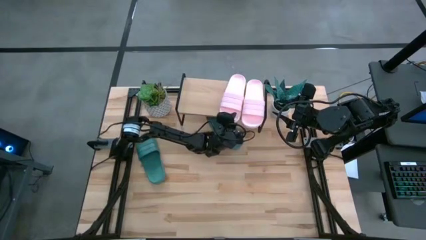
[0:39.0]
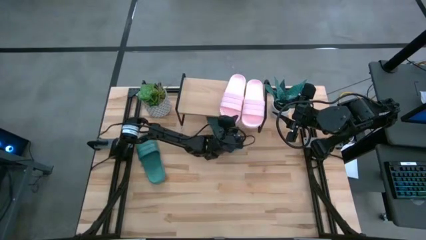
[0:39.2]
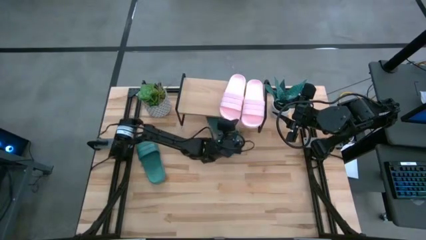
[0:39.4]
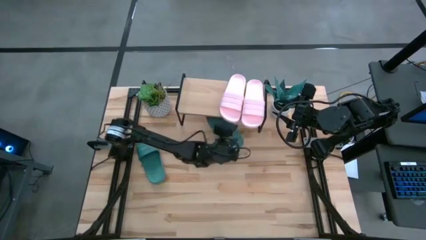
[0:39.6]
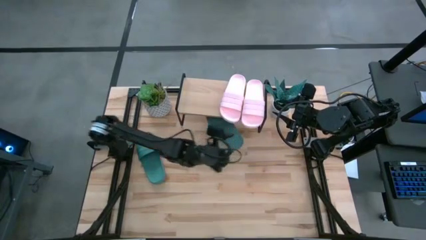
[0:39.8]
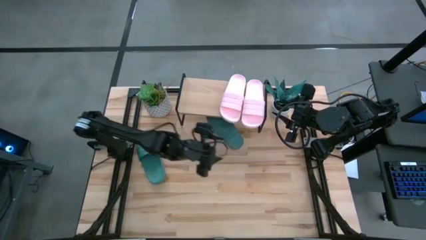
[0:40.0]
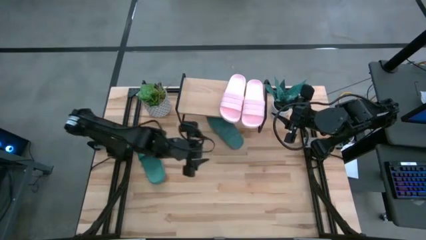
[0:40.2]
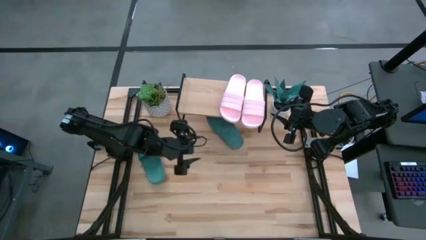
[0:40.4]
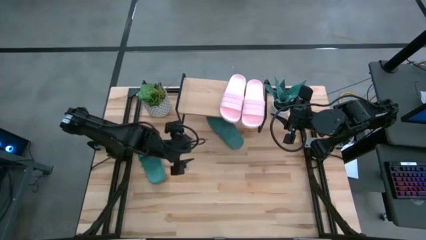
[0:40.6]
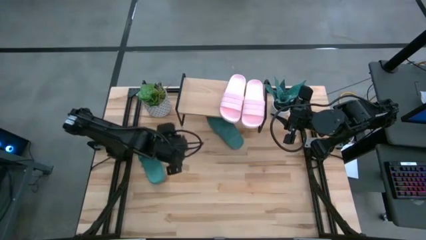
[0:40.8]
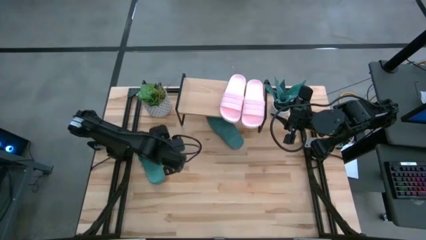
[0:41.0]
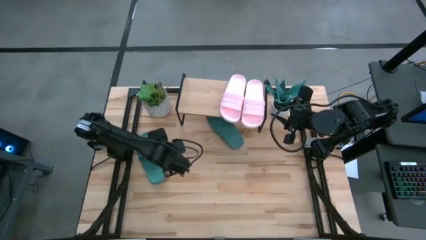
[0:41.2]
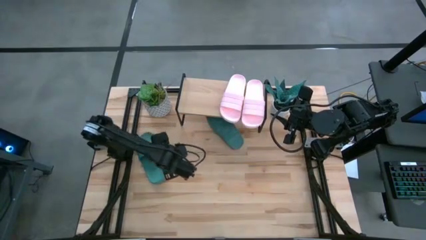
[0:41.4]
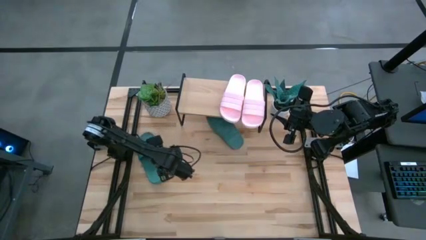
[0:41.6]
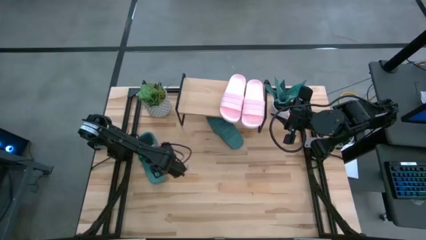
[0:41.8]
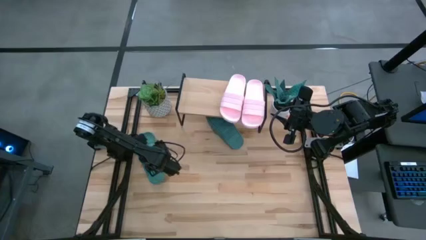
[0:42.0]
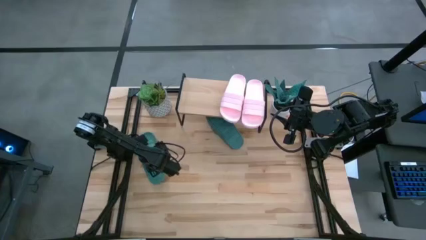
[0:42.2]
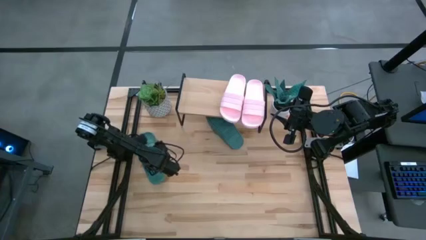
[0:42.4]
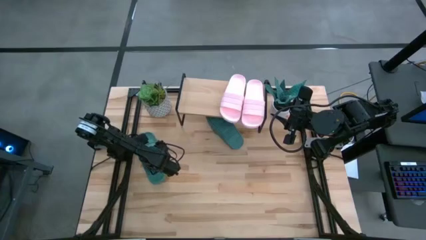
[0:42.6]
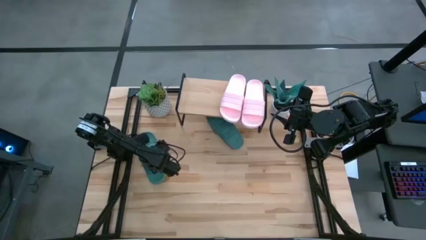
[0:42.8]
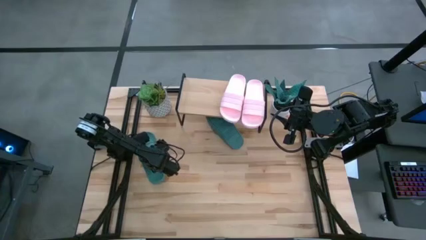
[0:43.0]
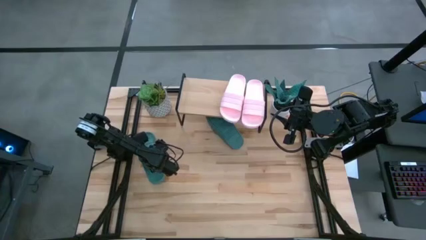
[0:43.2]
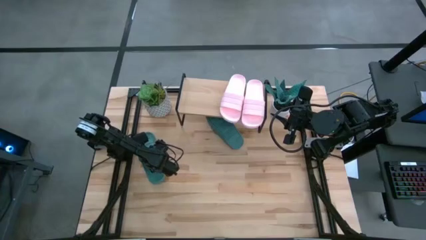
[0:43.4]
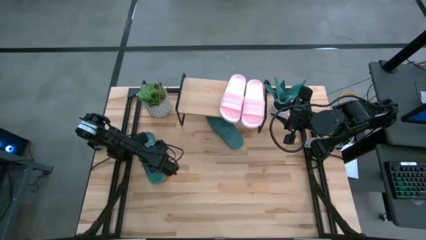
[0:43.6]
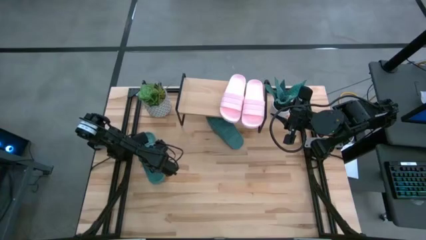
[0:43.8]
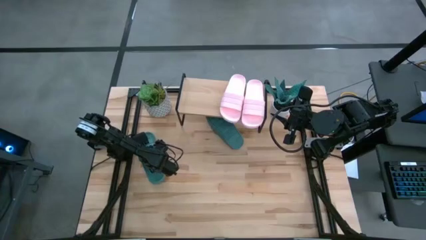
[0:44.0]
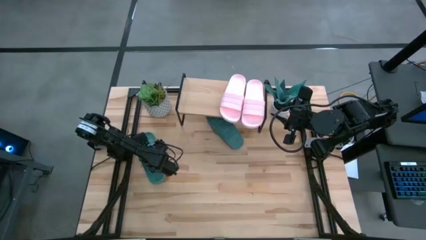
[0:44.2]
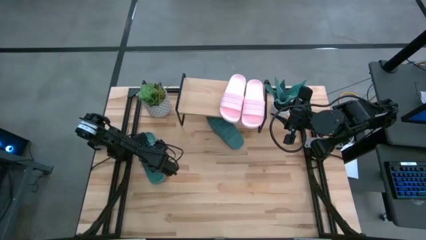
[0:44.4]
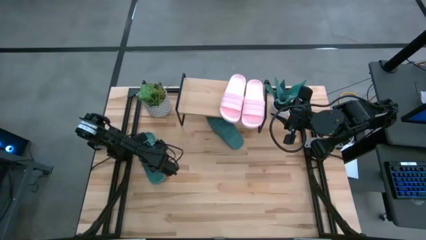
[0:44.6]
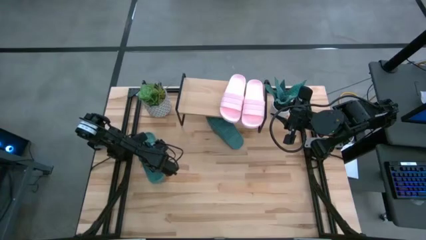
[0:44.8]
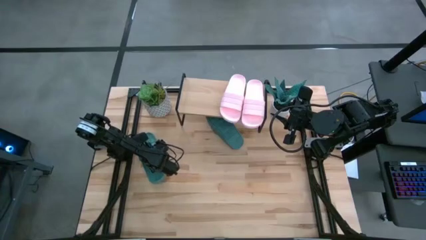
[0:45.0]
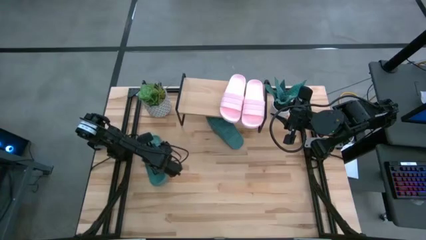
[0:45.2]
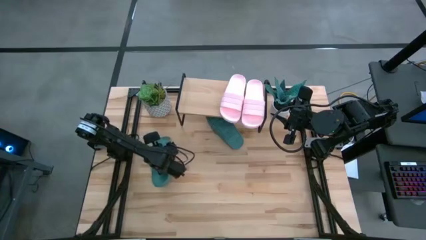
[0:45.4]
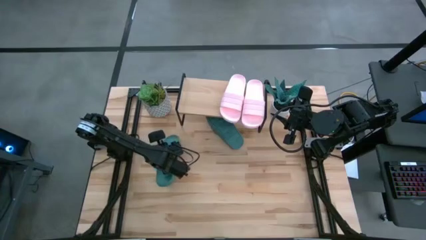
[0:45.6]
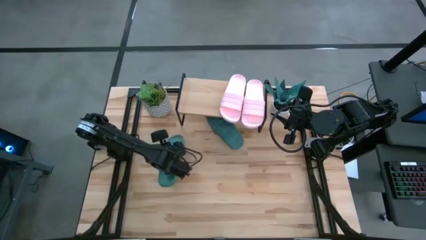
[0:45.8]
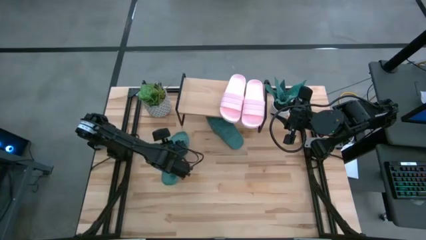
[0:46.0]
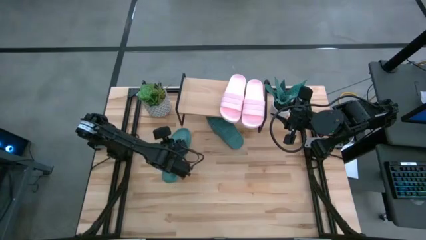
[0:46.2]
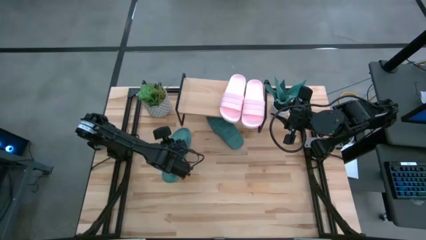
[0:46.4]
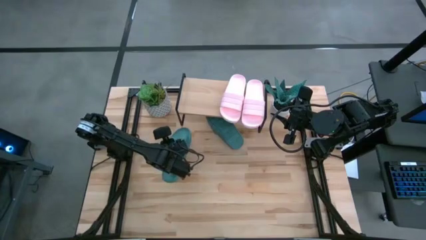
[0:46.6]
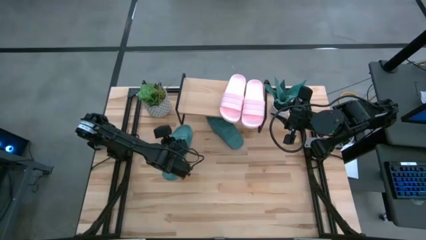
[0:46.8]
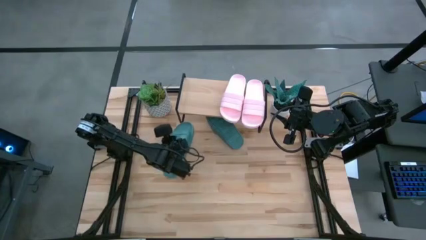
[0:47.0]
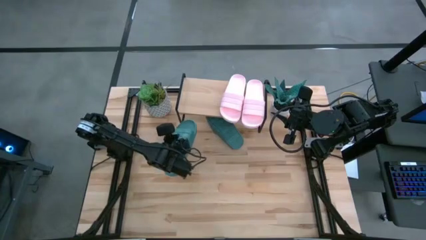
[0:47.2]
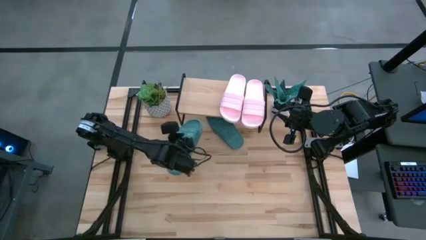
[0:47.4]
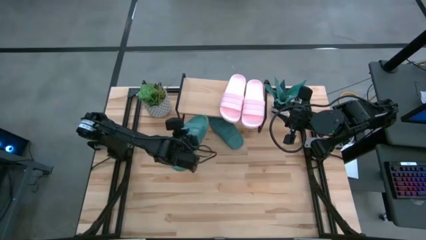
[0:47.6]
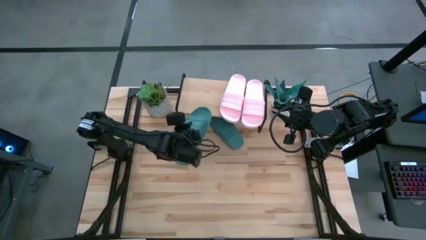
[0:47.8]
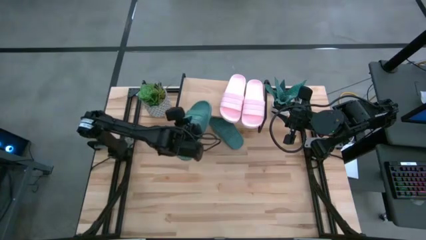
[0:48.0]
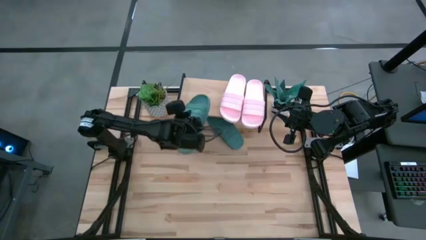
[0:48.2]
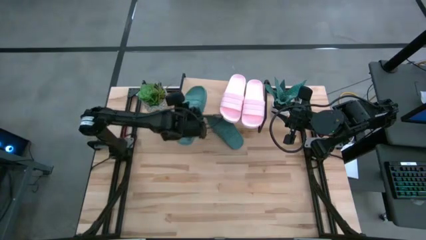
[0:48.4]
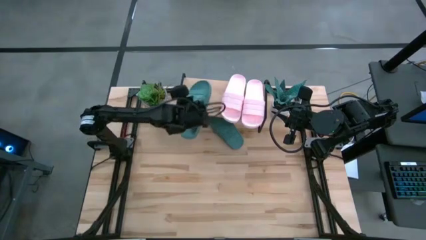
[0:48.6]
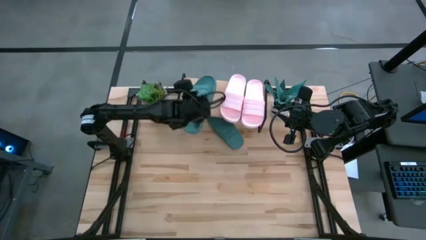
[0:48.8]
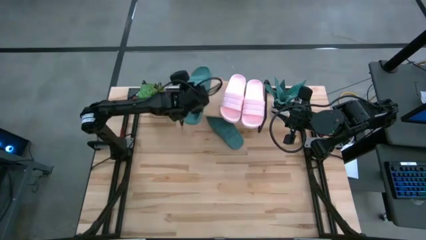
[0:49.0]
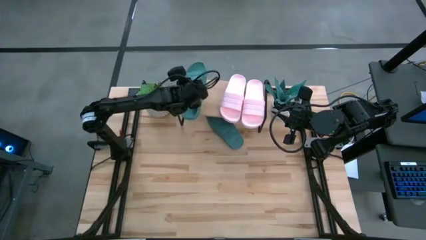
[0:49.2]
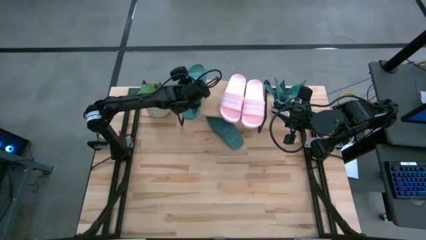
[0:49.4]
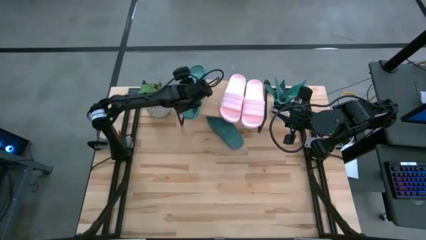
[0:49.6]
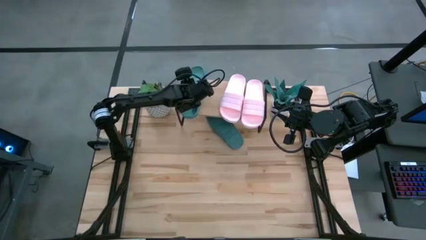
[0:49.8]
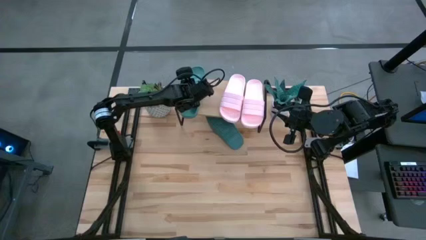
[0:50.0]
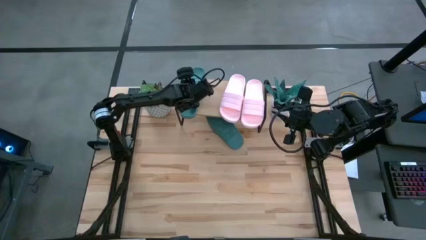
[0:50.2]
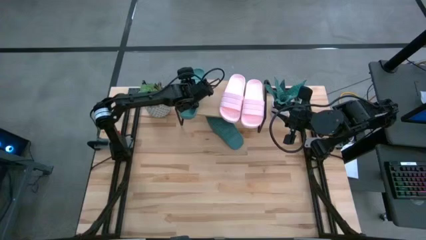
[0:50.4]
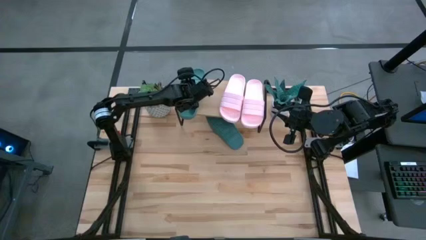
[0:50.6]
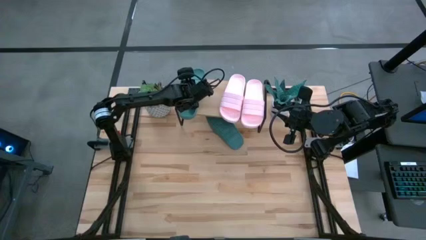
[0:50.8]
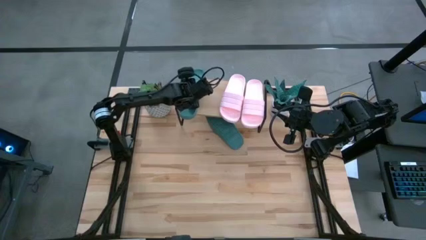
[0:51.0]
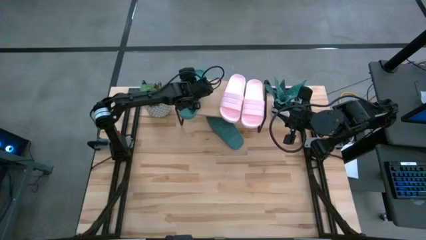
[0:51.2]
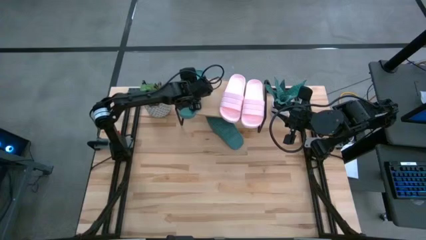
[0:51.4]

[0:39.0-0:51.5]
Task: Pick and place slides into the shelf
Put the left blue slides on the shelf

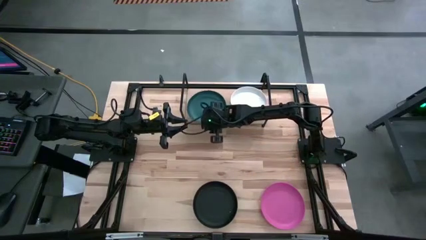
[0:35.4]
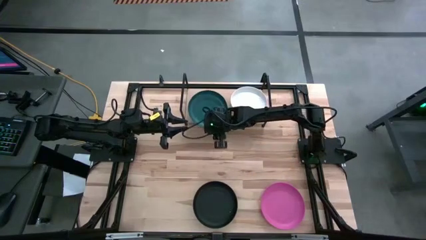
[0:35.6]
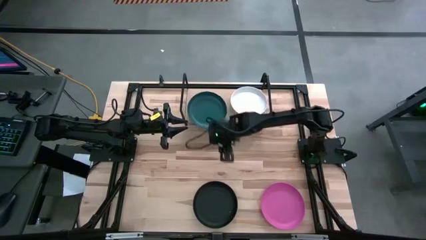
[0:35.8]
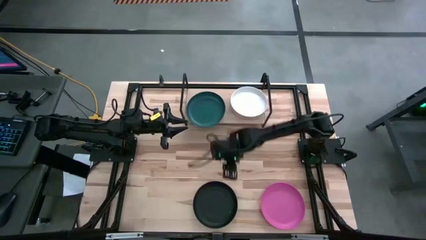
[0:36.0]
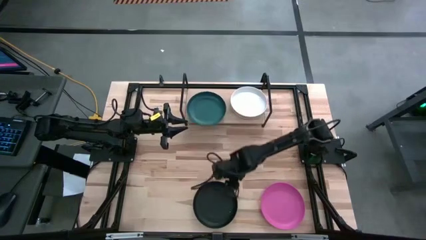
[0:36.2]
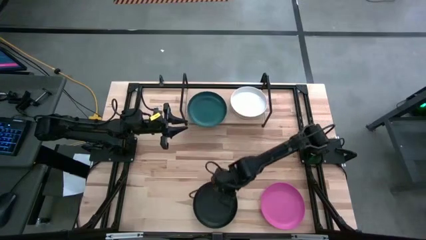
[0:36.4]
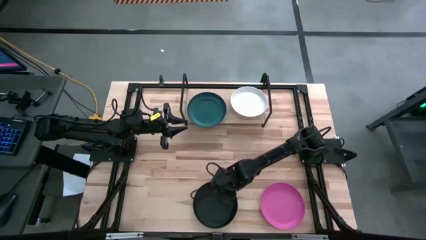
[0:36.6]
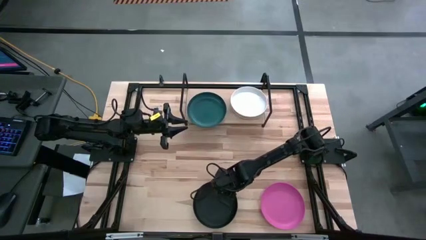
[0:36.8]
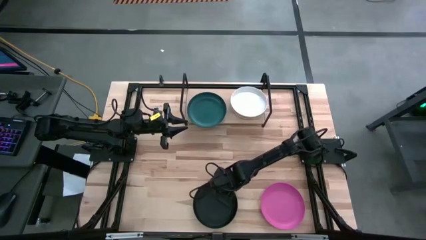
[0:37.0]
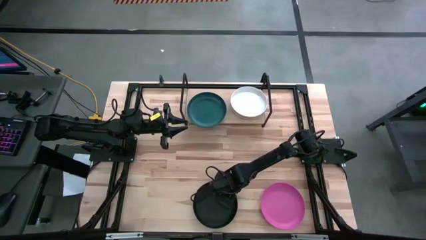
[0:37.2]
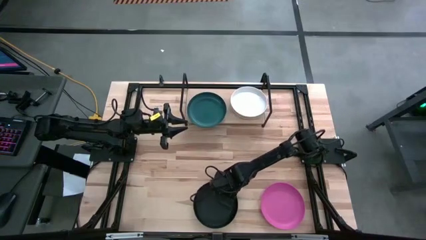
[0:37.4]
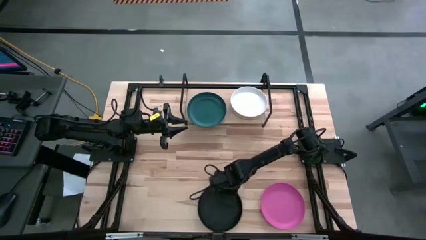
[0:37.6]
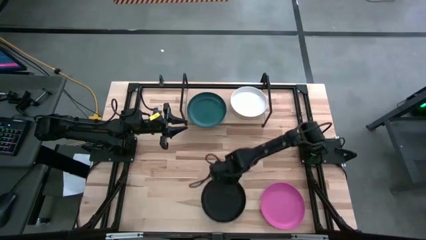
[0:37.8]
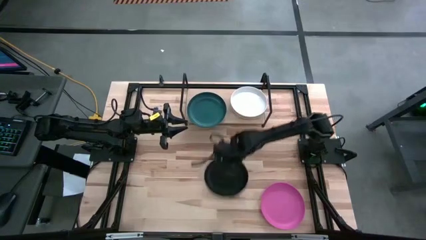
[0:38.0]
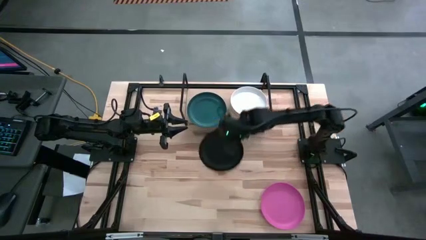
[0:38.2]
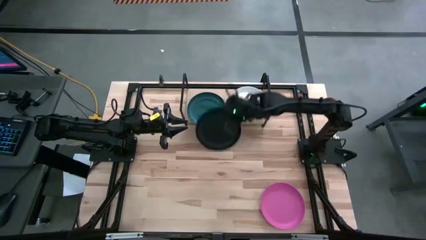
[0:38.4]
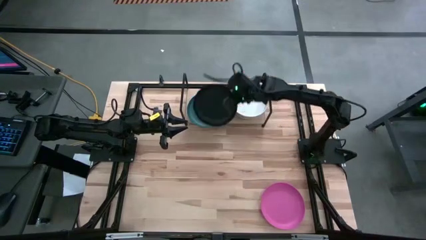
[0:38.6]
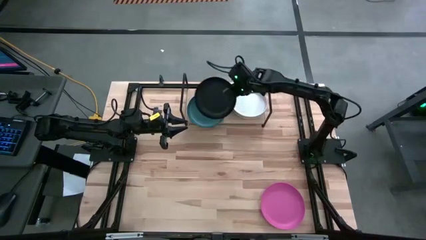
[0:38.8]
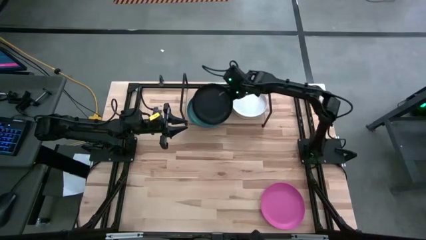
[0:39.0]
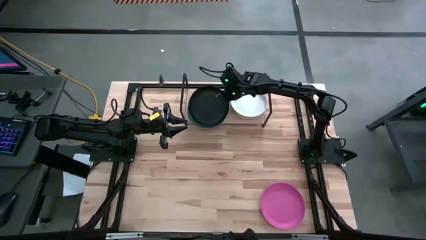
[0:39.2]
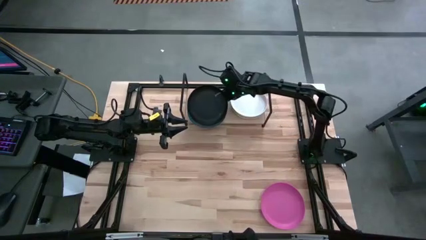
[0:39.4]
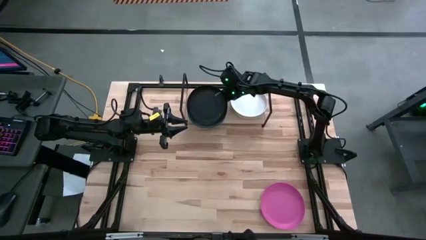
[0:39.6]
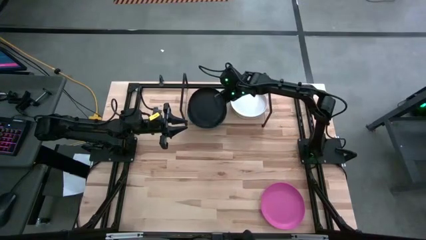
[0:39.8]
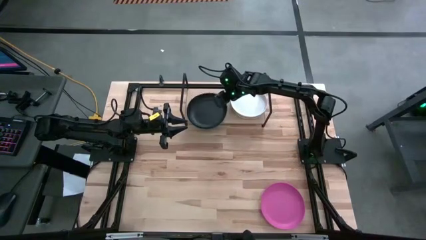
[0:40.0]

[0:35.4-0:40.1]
Task: Place and stack plates onto a shelf
Stack the black plate on top of the dark green plate on the shelf

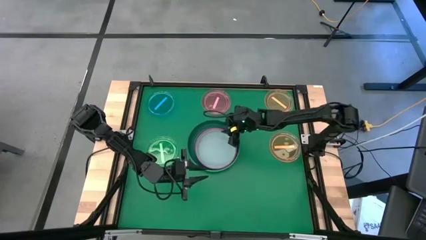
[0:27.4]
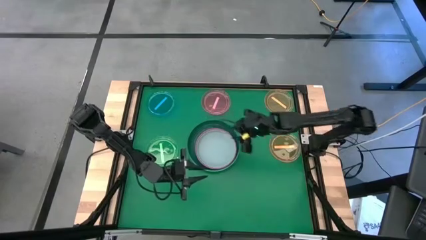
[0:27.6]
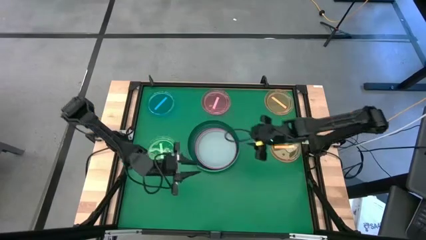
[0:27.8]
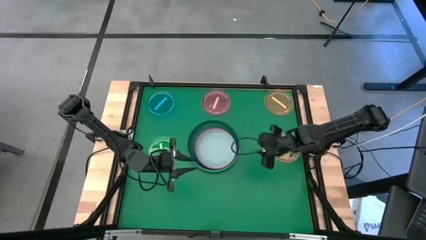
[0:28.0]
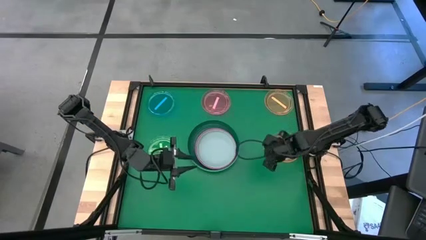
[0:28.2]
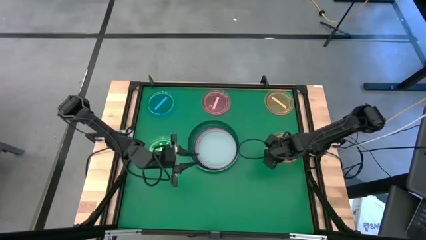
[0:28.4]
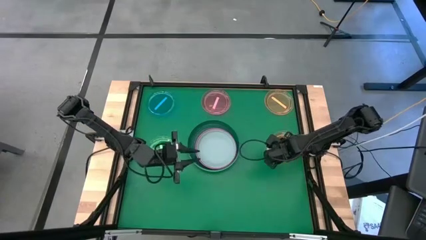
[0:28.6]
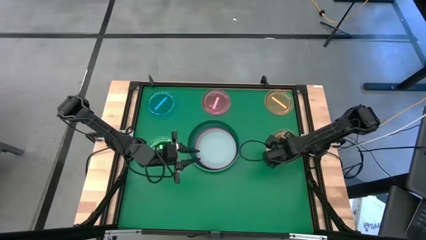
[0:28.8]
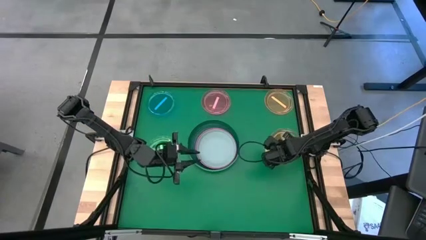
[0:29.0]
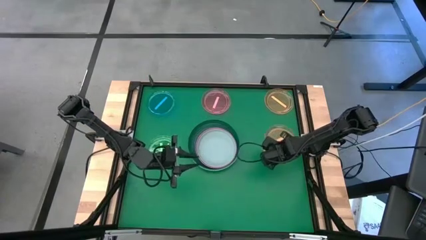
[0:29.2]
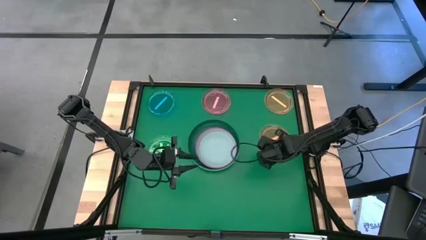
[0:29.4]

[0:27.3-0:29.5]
Task: Stack plastic plates
Stack the bottom orange plate on top of the gray plate
